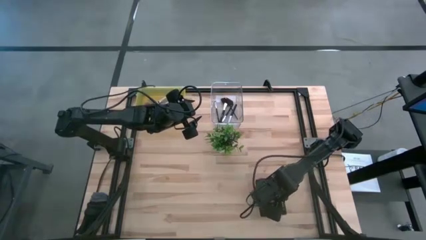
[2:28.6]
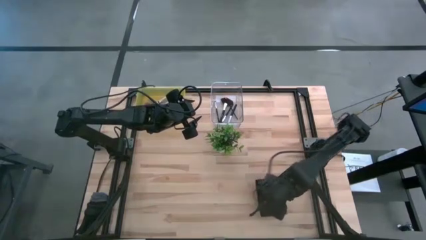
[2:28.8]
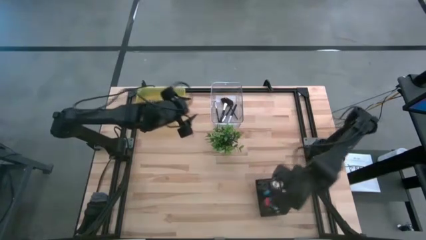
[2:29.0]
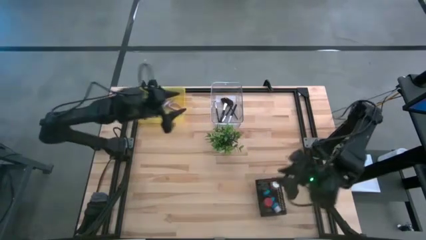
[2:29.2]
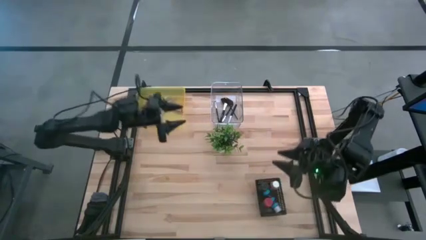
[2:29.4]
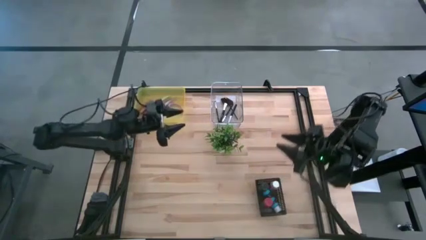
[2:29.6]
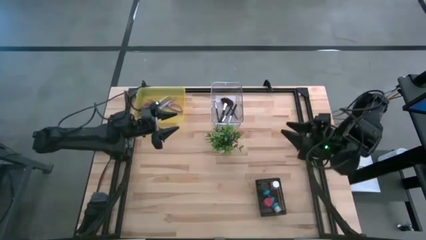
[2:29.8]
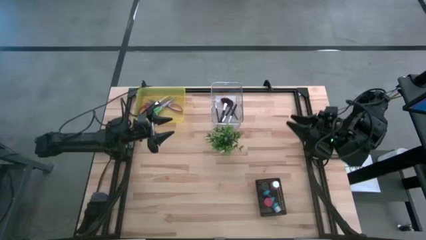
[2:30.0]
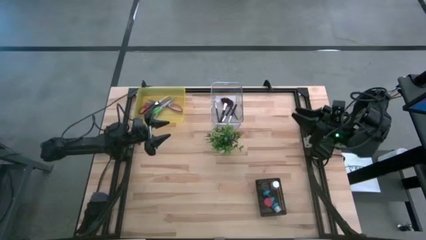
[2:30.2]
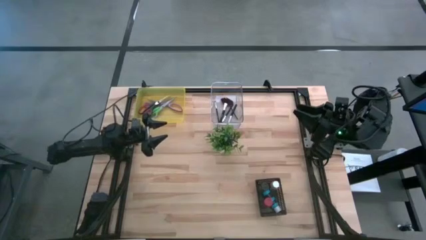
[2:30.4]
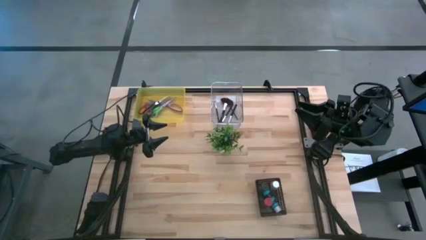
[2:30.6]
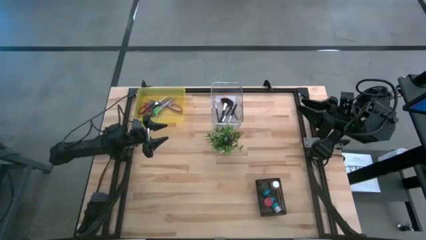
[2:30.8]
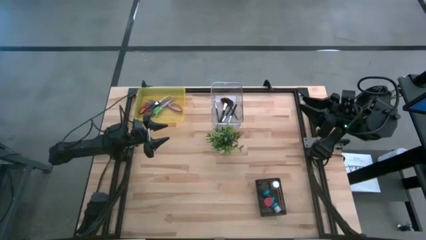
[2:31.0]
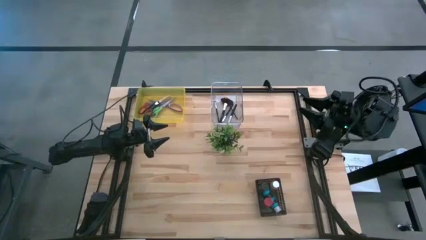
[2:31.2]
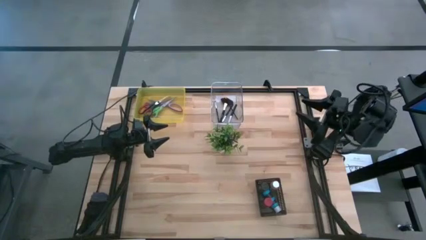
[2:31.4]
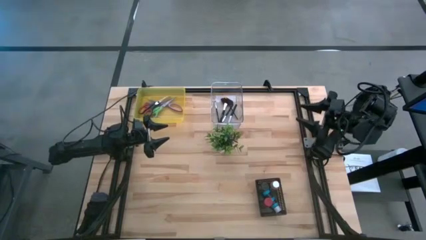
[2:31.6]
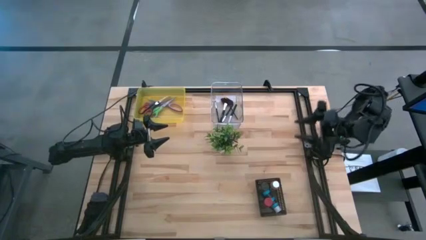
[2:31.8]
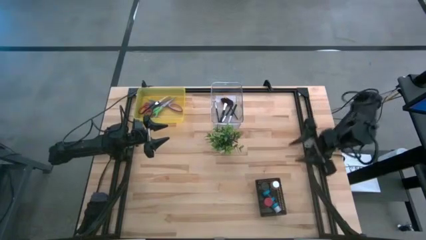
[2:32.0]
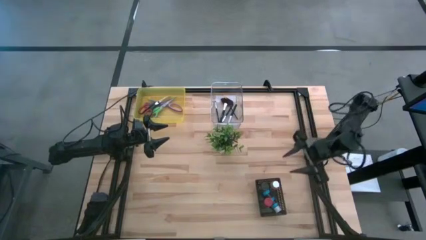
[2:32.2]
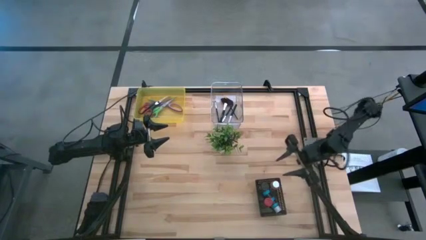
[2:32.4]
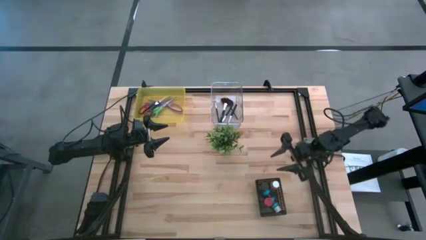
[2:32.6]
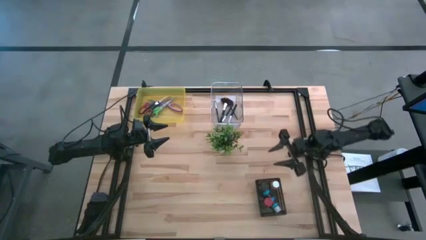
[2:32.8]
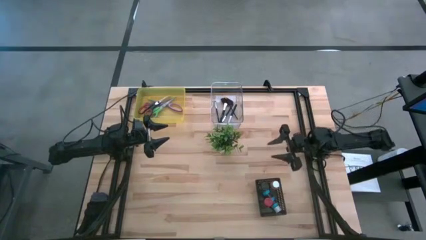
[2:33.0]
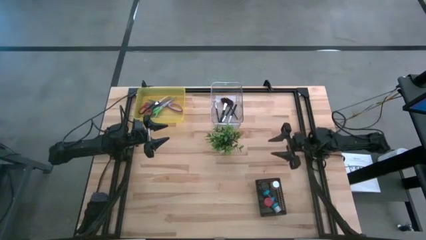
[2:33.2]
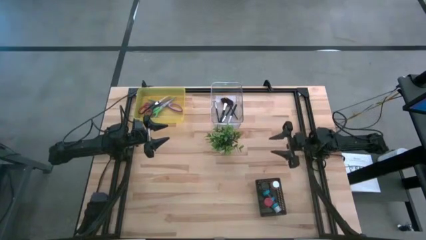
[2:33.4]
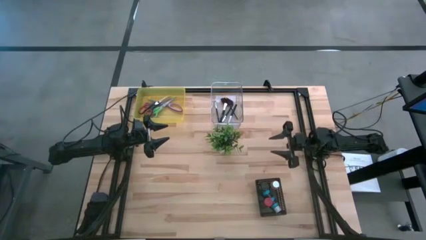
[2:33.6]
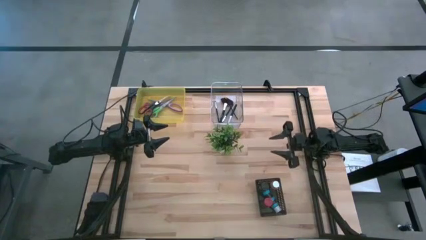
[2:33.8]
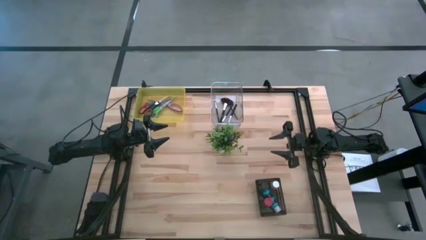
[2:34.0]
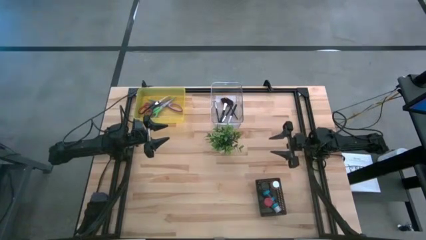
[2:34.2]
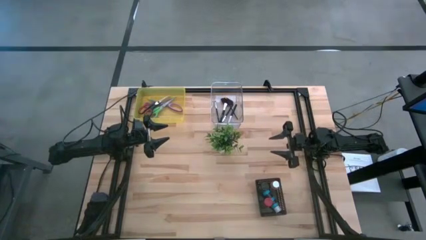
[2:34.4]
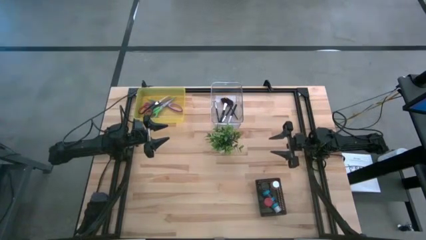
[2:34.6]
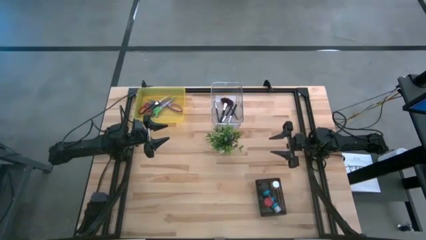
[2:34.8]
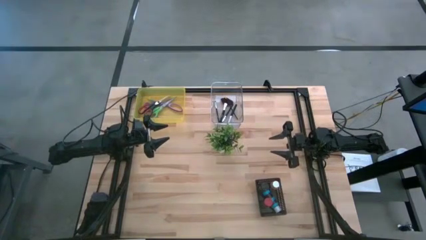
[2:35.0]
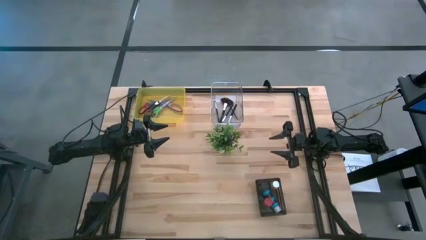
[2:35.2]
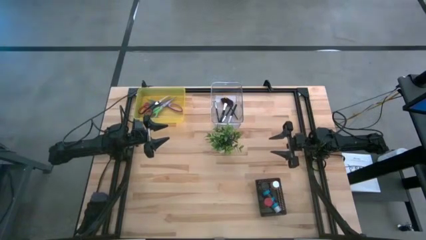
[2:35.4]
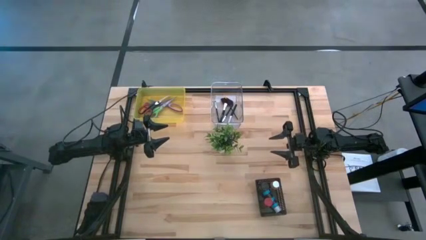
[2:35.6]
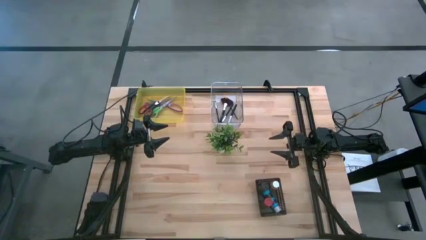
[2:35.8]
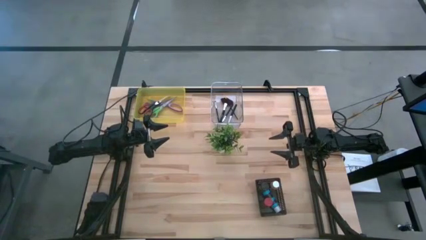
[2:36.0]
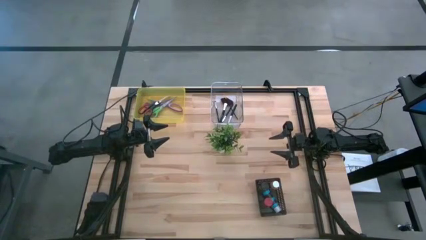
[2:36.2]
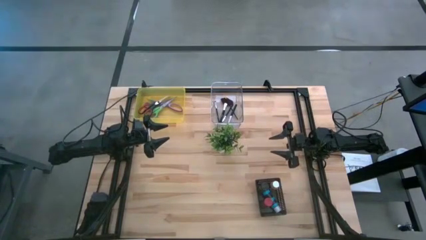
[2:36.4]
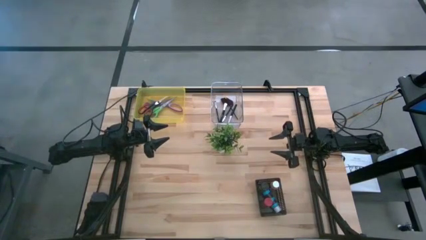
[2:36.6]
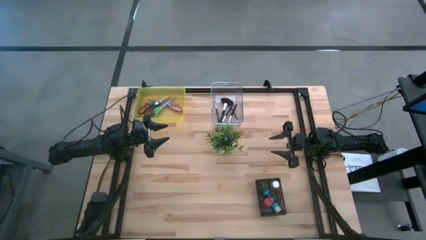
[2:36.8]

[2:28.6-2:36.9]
Task: Pick & Place Paint Supplies
Return to Home Position

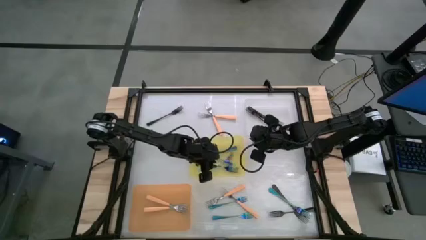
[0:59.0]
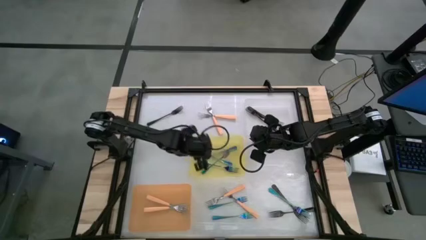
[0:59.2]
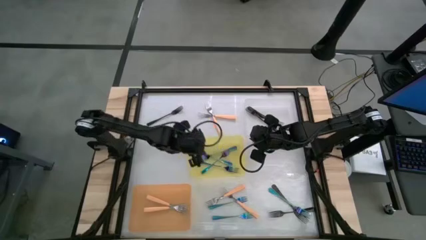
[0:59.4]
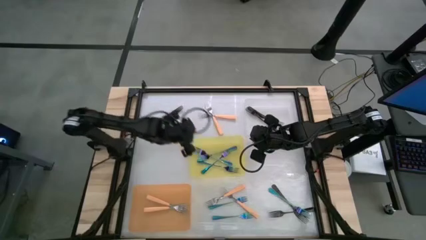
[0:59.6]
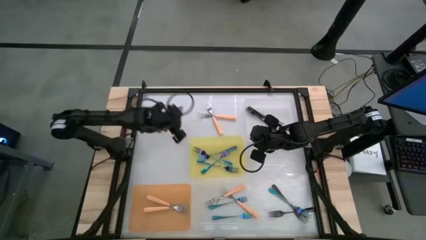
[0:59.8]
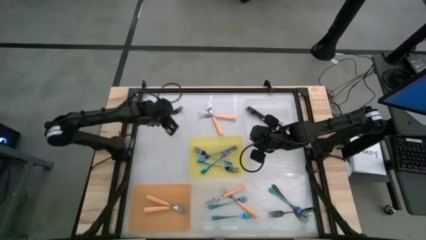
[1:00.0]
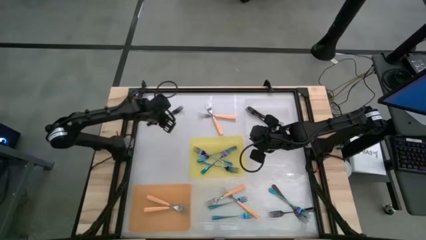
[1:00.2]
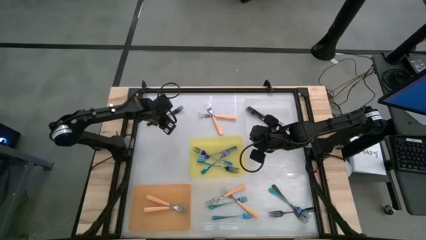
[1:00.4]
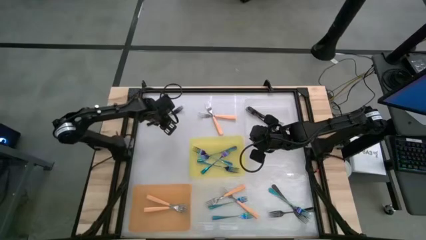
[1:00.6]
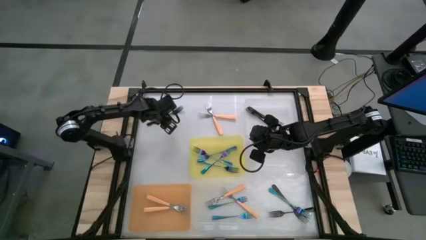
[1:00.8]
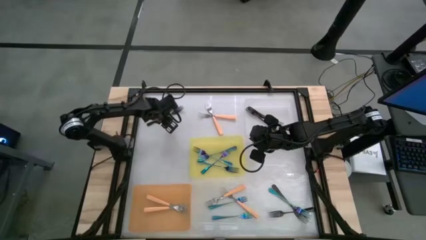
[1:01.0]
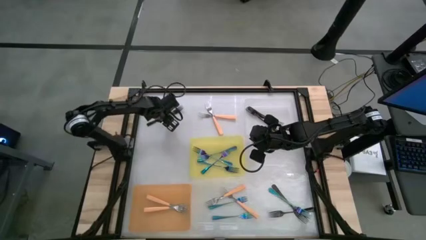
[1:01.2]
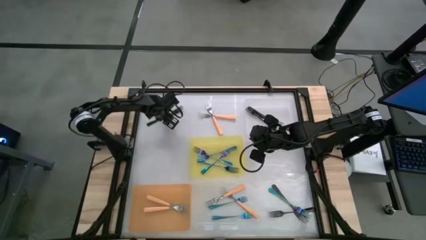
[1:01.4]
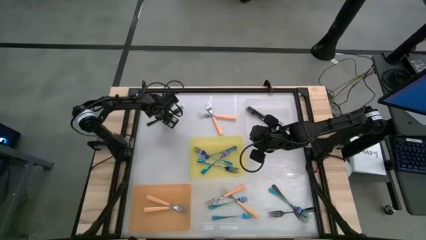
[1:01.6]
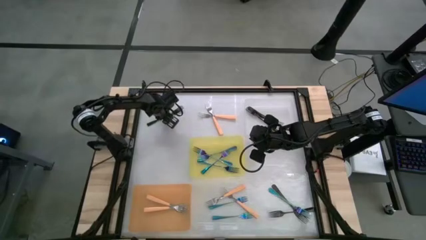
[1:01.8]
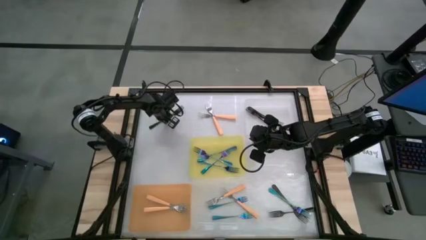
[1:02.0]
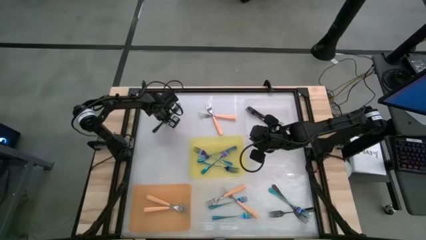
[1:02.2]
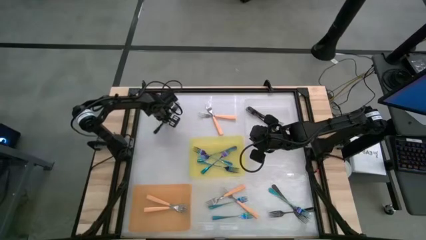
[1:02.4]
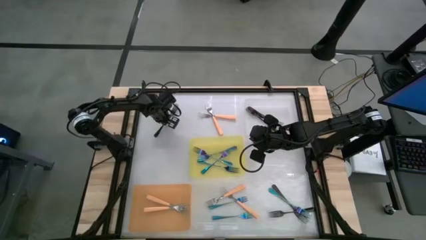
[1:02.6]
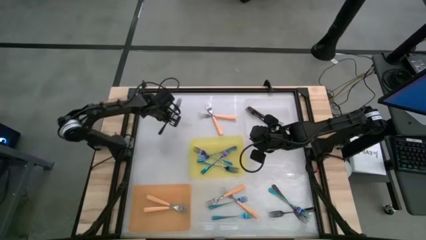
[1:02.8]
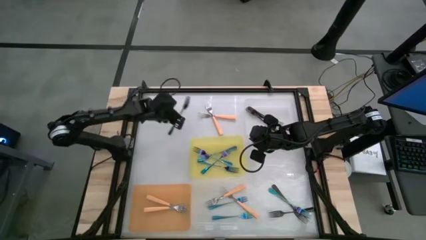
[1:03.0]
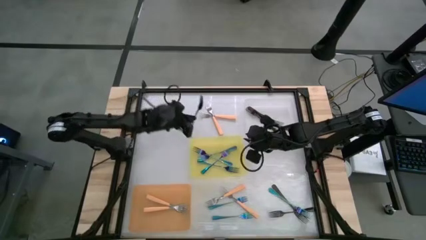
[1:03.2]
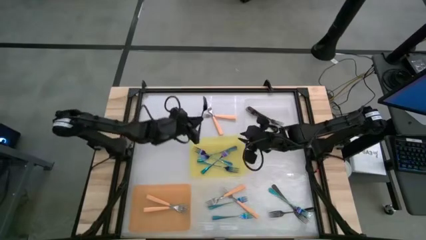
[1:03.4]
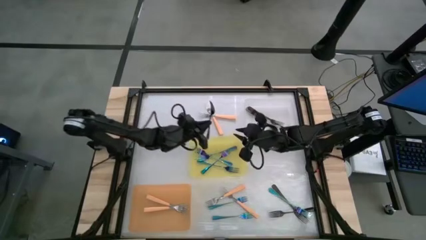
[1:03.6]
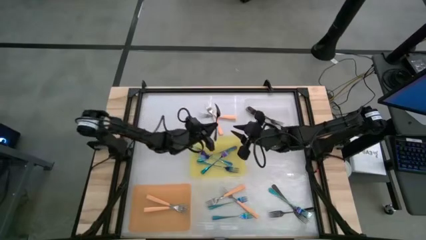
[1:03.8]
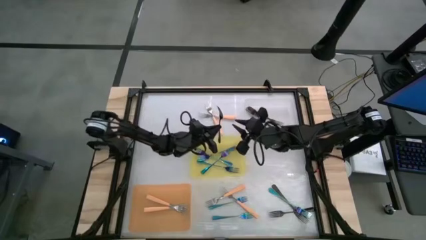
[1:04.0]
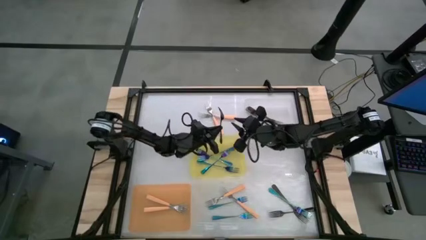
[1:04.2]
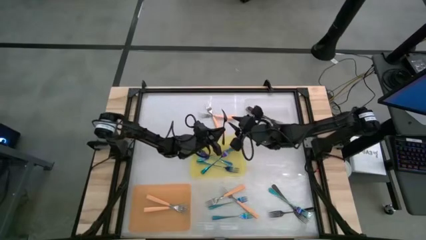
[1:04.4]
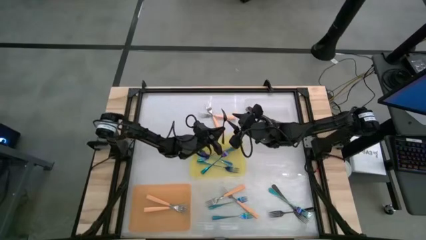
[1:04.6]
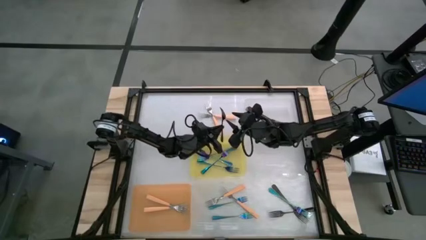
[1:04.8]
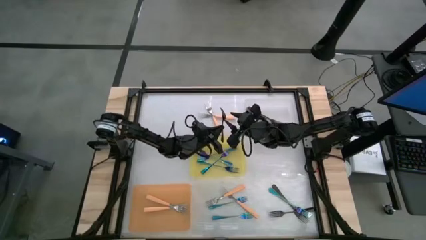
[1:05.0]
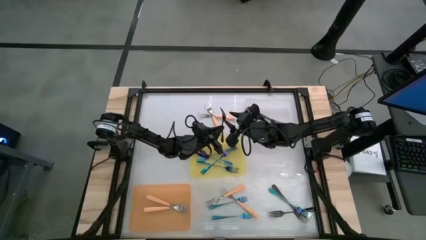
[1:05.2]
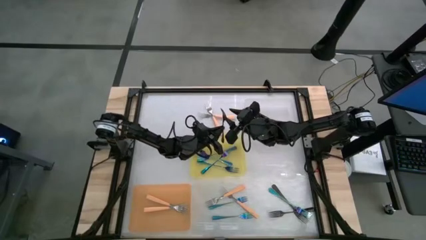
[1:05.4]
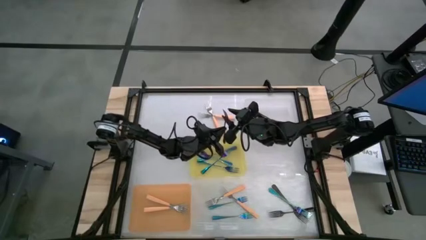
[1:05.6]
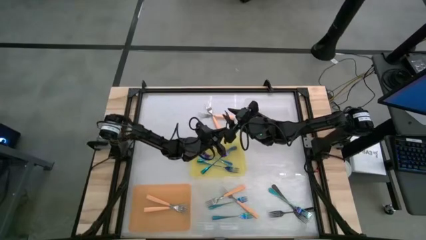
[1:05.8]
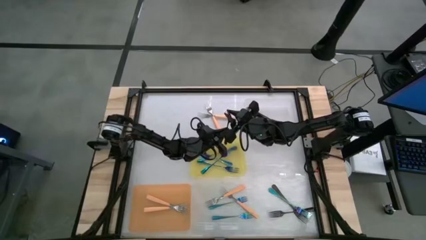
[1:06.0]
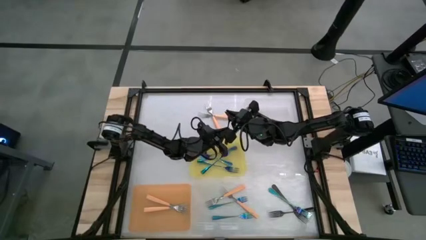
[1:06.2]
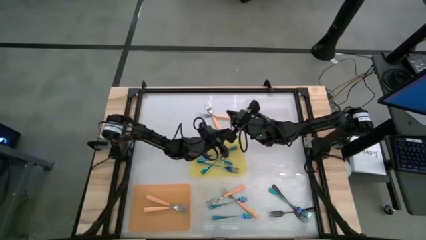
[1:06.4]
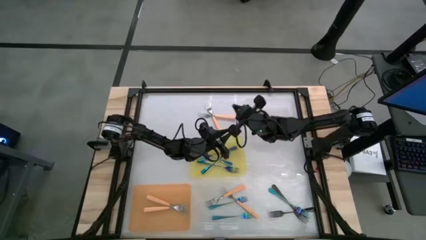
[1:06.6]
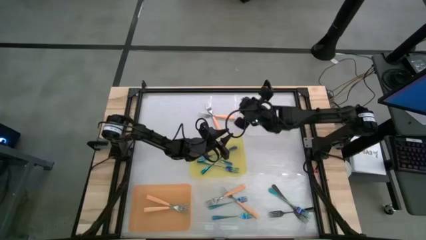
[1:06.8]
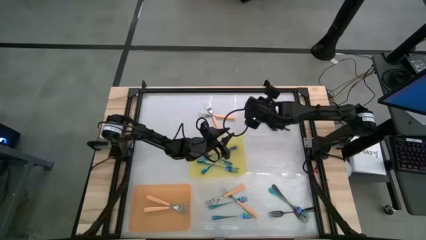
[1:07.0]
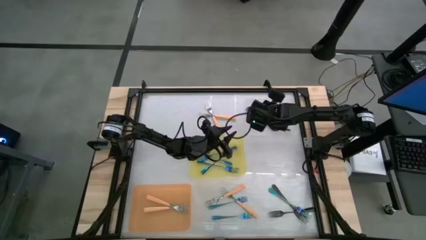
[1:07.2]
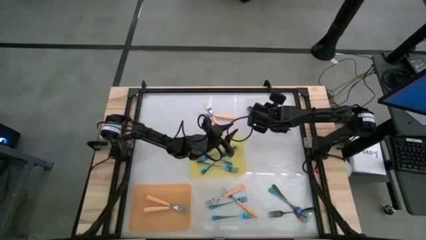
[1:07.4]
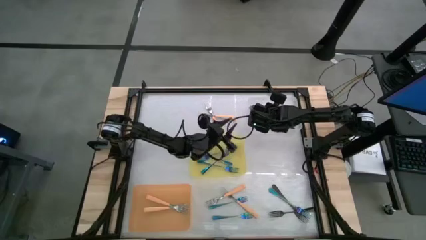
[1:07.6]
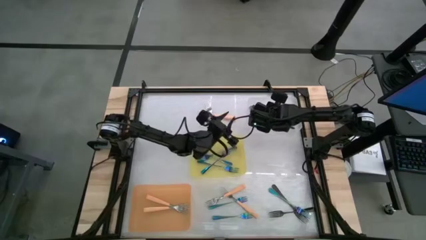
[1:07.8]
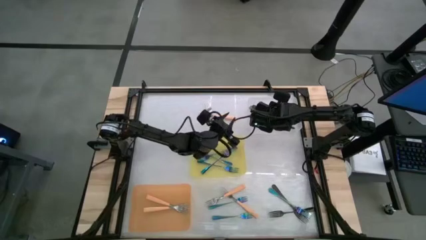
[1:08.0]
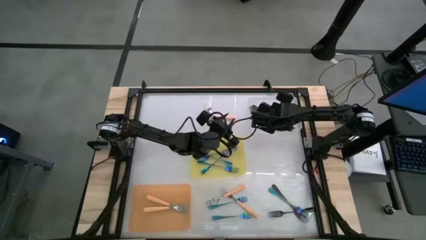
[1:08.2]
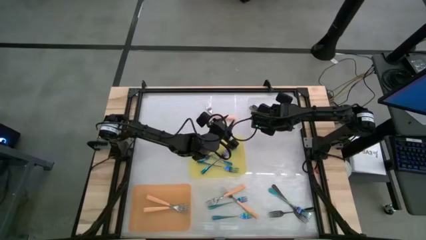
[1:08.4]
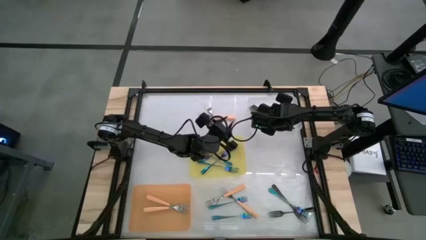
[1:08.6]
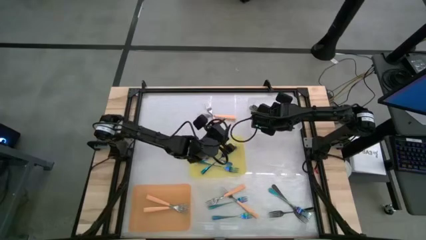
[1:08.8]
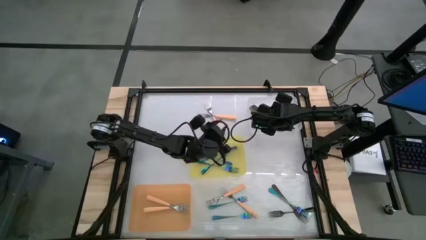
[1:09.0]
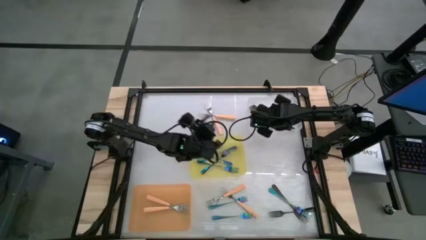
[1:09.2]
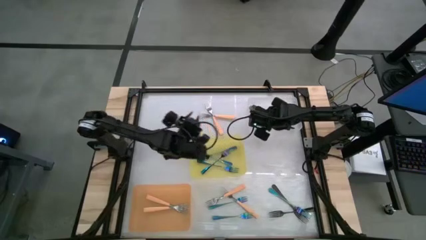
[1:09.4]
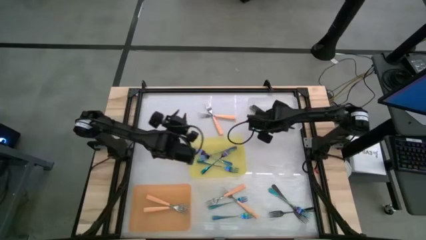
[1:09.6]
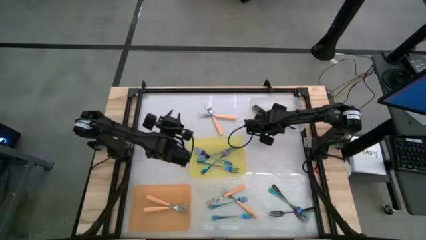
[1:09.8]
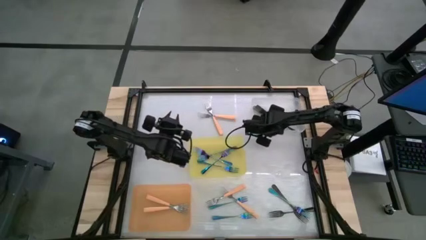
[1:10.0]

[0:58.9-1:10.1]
Task: Sort silverware by color (type)
Put the black fork into the transparent bin
